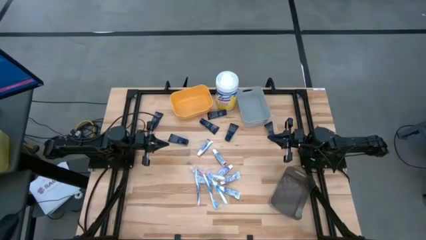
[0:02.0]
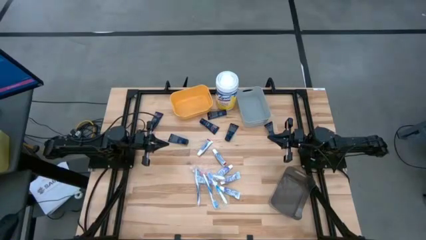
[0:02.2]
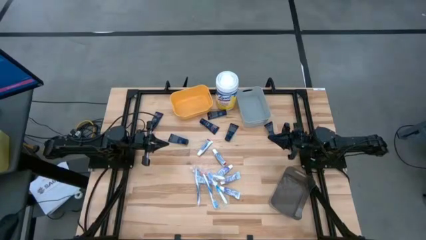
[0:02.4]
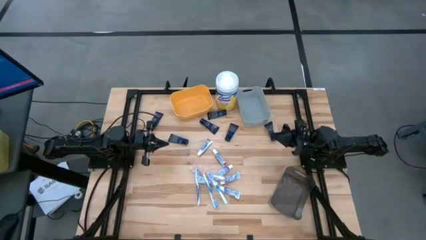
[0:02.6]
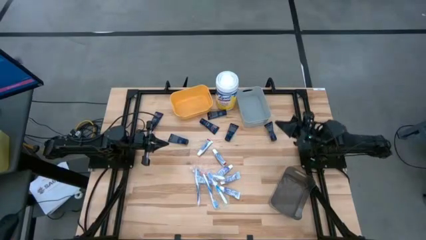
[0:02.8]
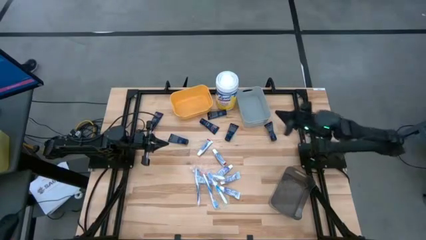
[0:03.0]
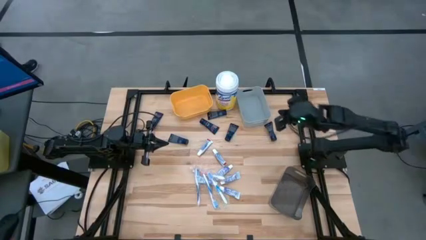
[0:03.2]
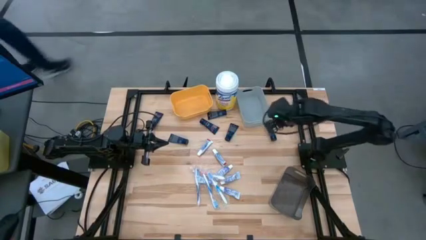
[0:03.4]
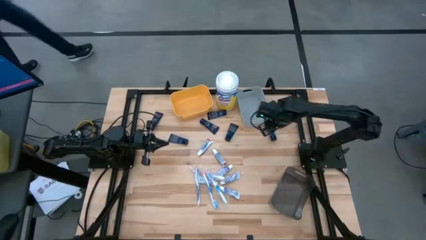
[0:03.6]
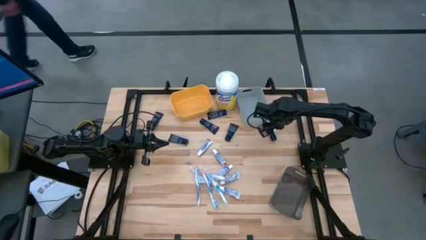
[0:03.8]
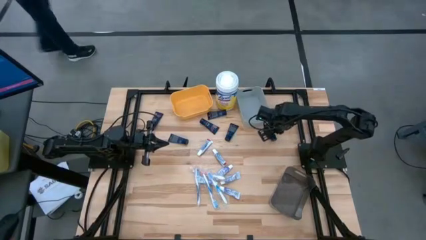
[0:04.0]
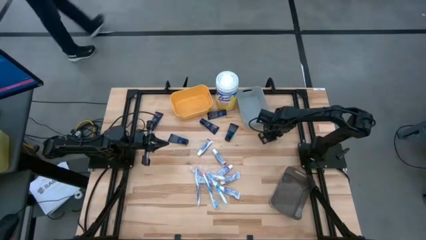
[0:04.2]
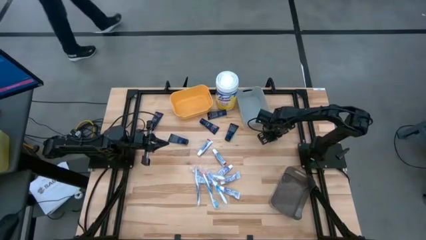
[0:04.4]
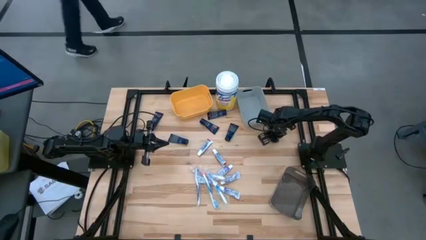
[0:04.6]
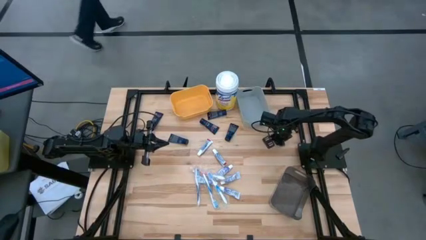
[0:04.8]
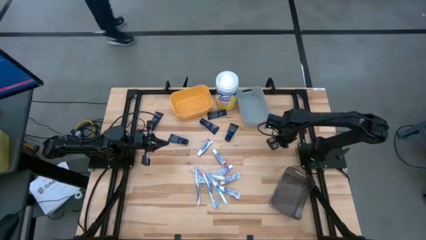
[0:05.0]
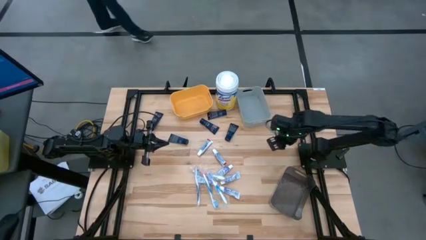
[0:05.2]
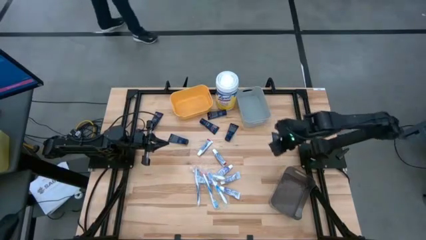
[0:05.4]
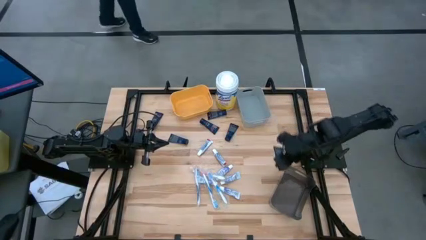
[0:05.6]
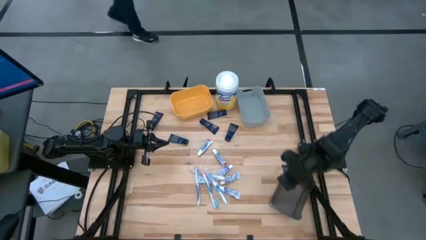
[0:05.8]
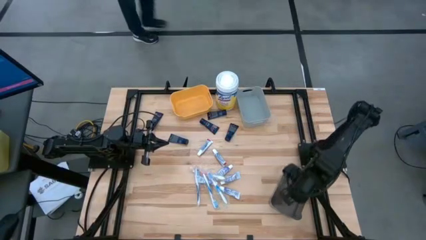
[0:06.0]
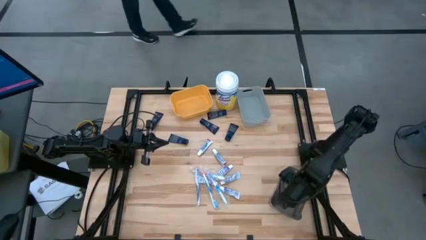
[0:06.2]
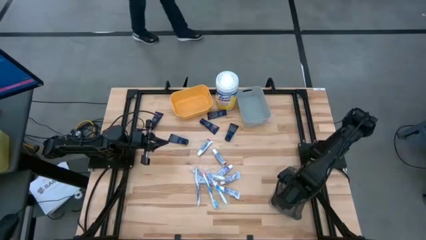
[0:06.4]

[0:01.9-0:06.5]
Task: Pick & Place Travel size toiletries
Put the blue shaving butter into the black bin

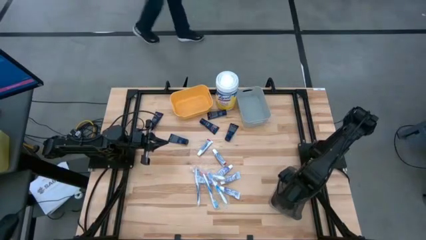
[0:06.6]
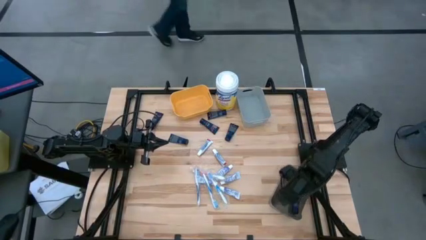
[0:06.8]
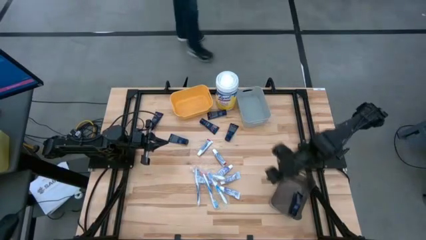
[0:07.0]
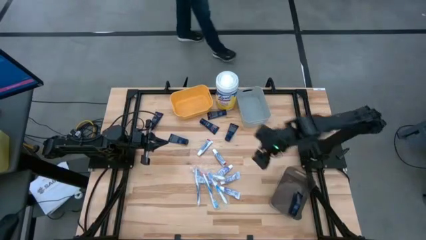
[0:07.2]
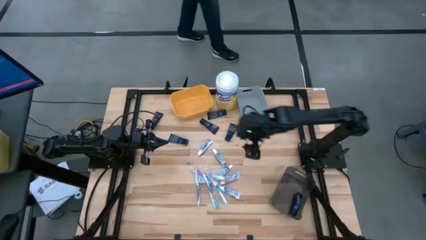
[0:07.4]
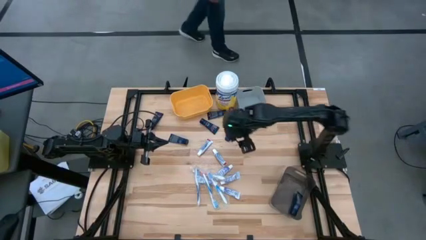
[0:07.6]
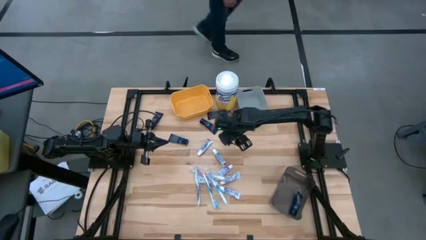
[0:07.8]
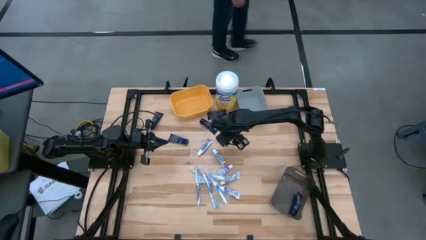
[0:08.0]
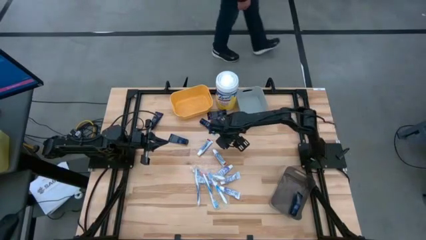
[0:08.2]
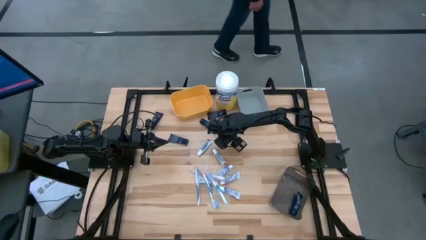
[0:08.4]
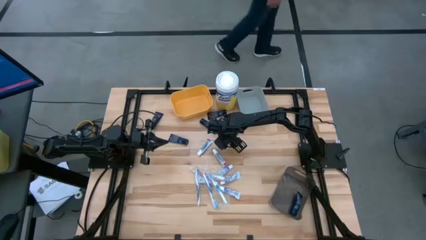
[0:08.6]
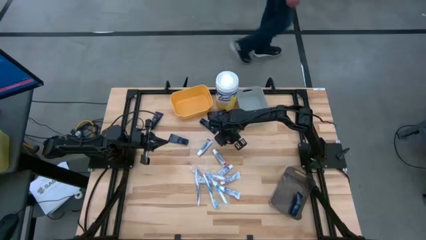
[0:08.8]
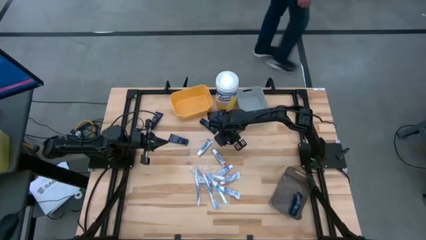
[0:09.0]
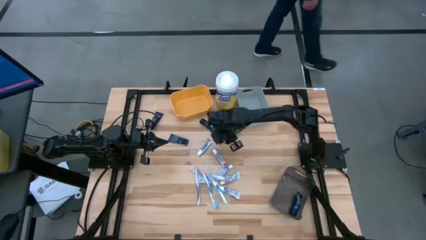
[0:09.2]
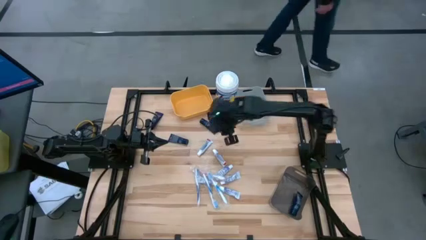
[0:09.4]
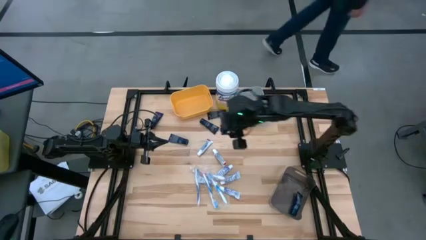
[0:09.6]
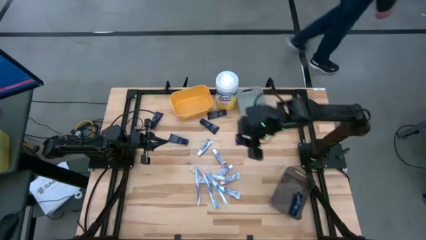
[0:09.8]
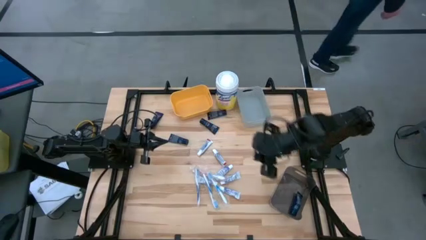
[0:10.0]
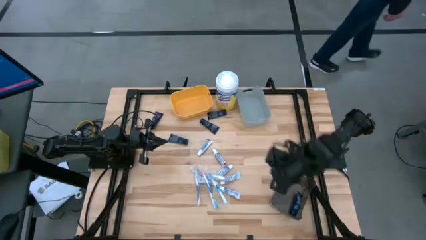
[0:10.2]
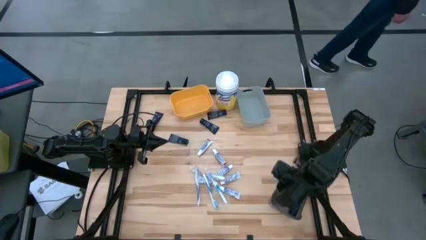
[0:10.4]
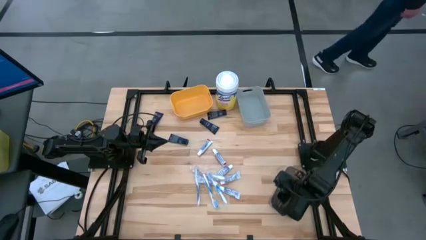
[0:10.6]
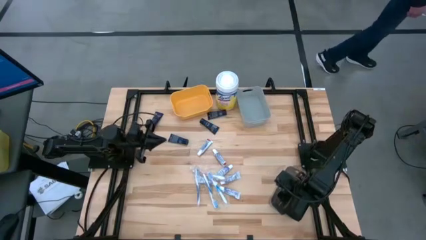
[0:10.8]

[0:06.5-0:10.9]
Put the blue shaving butter into the black bin

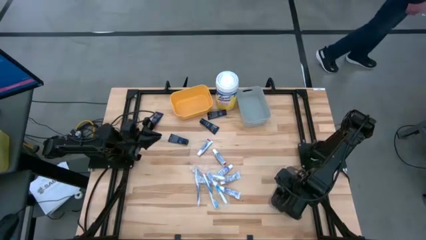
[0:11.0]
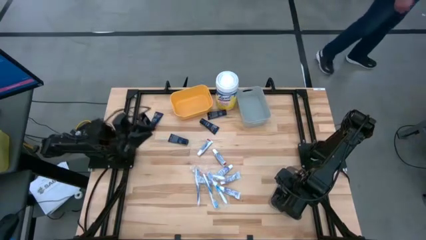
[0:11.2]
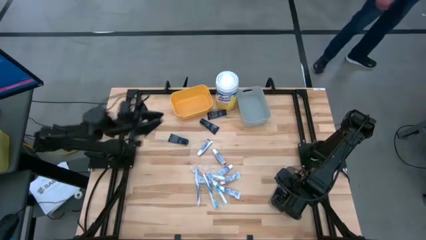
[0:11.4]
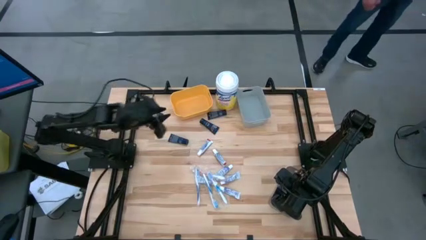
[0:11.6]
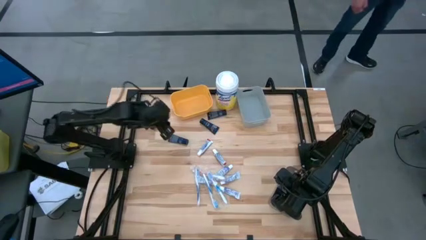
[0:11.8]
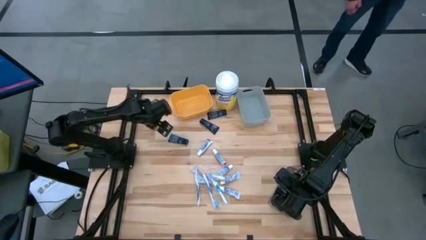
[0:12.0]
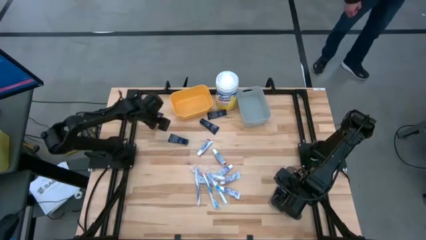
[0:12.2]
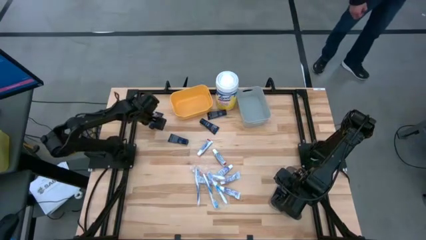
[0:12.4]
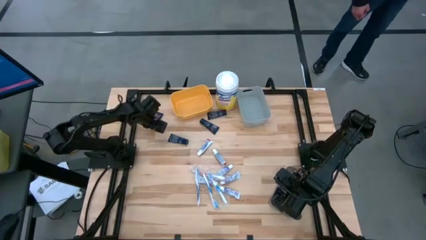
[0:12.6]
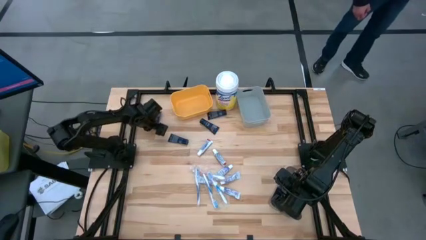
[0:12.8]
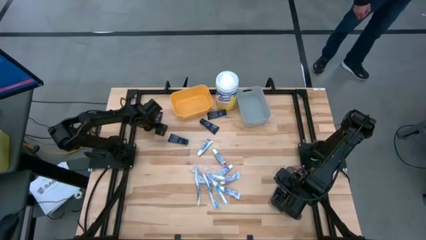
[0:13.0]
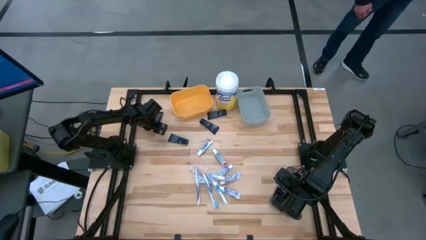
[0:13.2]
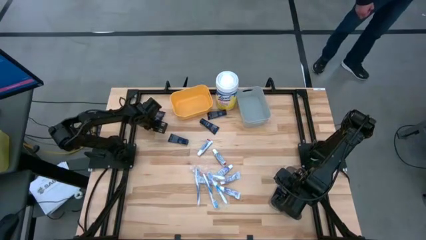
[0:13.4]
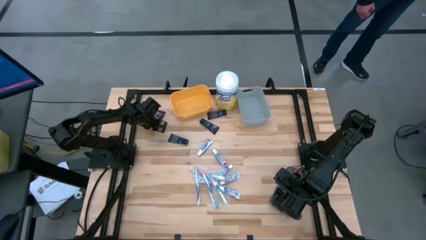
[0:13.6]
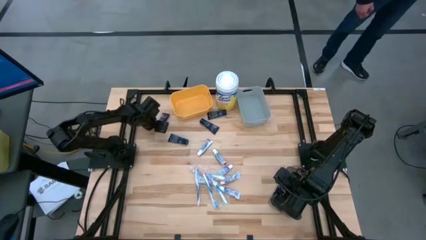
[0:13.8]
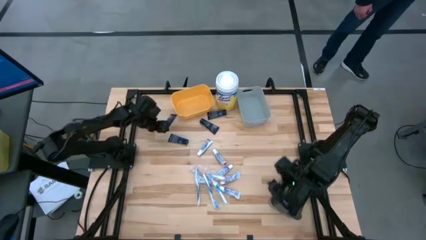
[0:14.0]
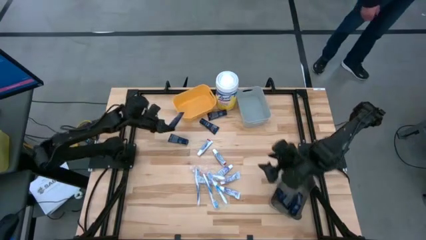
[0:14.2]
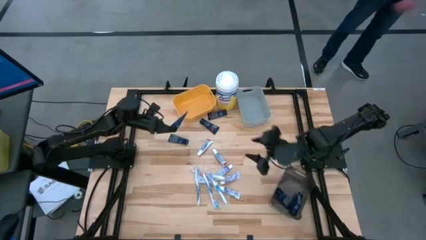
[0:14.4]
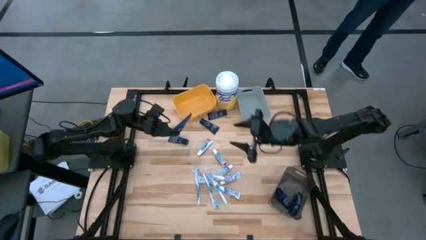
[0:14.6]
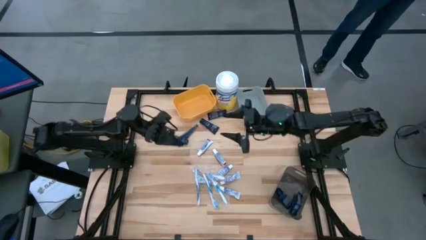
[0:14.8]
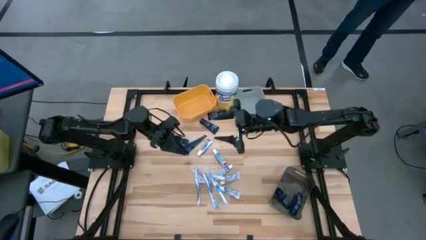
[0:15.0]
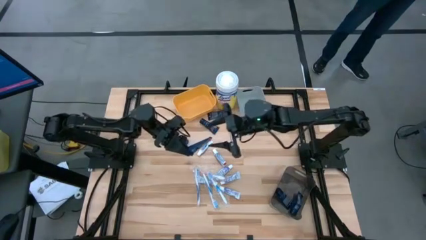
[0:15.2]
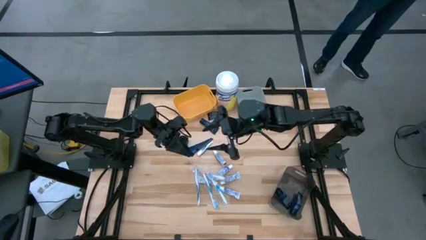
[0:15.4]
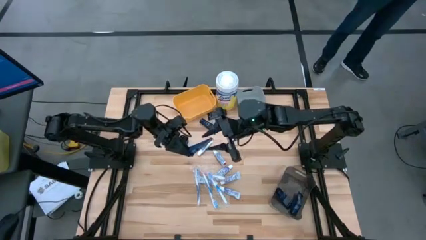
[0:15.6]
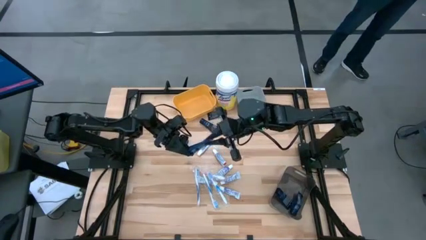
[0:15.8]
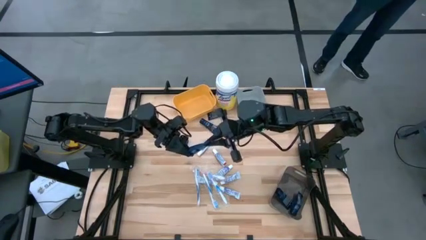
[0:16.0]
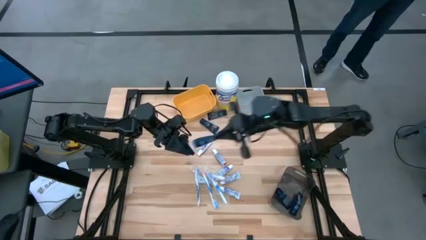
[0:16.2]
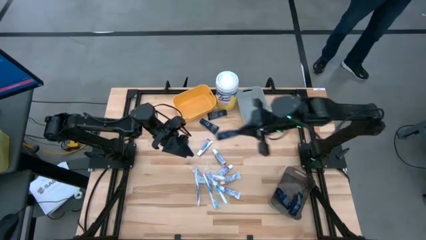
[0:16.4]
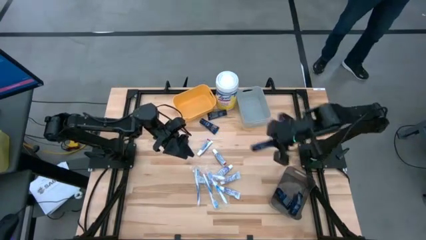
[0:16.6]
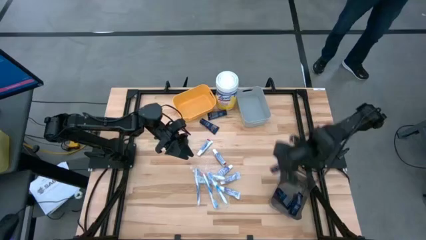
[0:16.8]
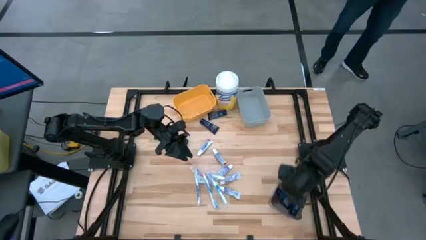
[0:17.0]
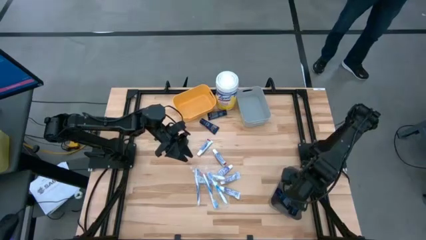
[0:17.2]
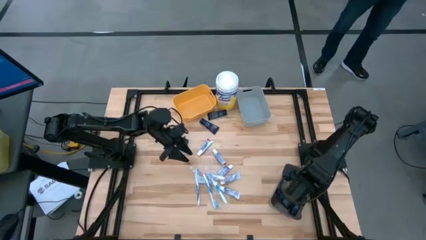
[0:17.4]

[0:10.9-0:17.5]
Put the blue shaving butter into the black bin

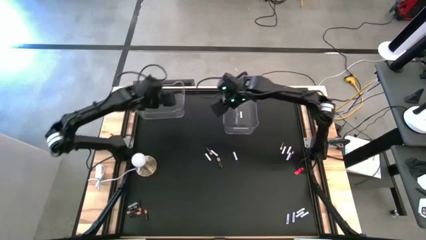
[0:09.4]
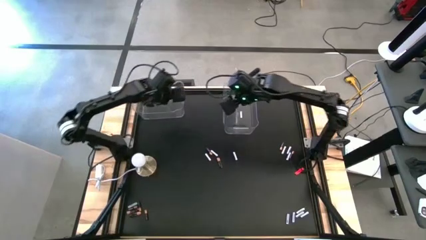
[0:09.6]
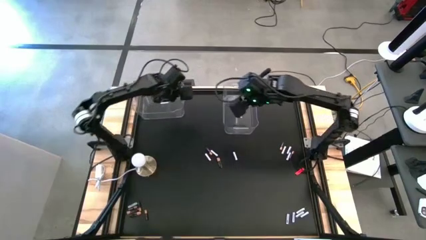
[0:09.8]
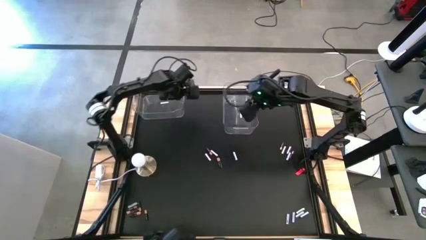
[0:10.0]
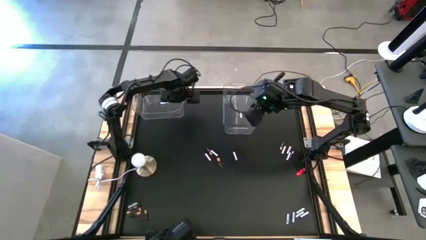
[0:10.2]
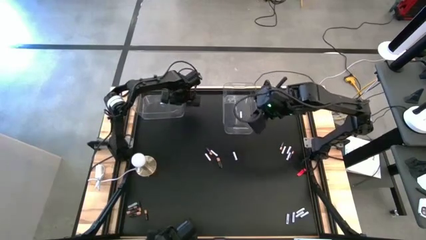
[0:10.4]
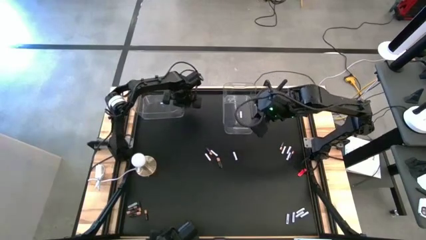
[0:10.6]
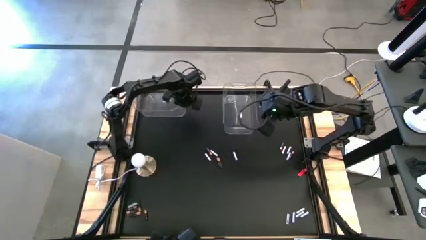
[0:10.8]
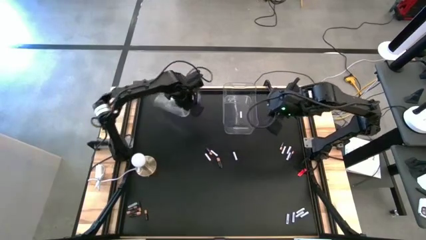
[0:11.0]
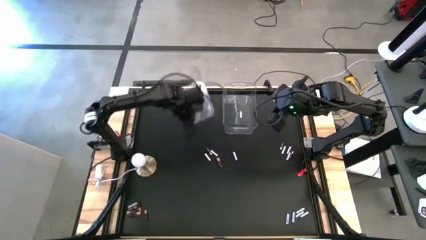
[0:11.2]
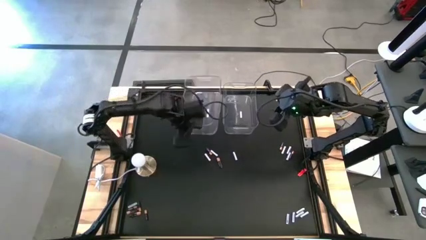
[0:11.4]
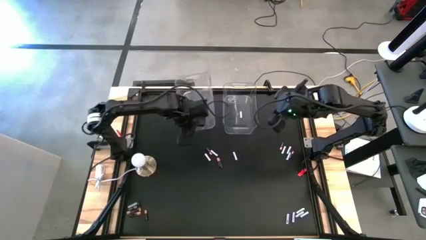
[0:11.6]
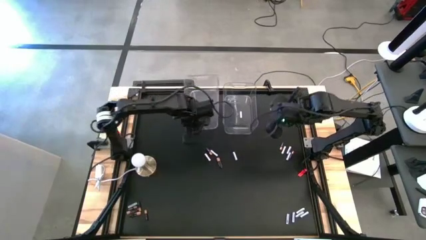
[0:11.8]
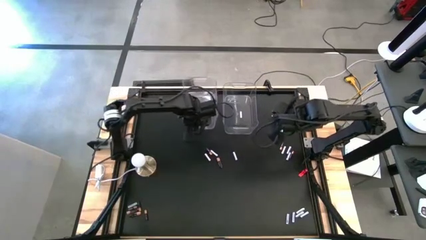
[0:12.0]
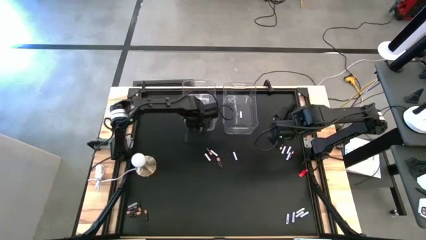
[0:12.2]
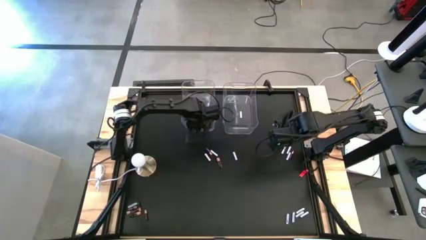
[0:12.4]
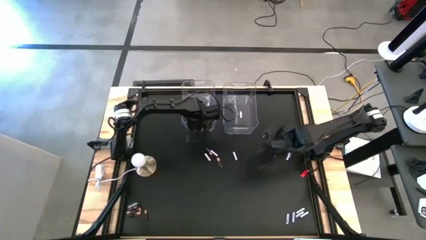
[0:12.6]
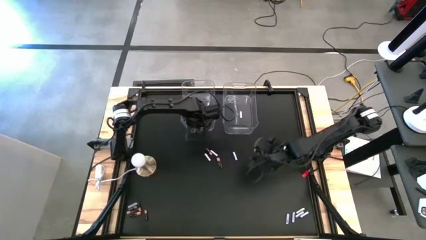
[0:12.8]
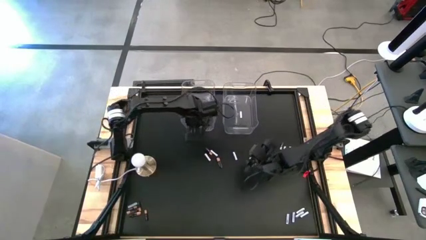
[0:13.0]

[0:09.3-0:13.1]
Task: Sort batteries
Move the right transparent bin to the top middle
